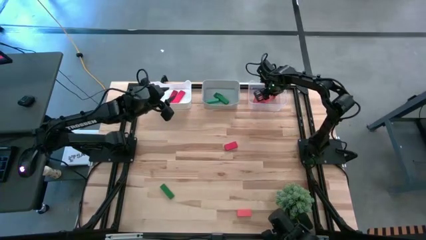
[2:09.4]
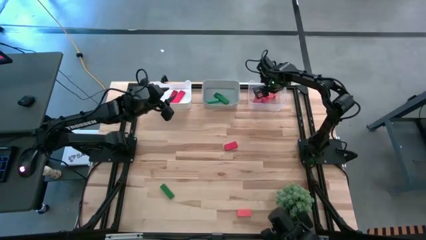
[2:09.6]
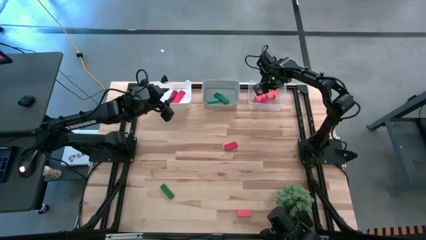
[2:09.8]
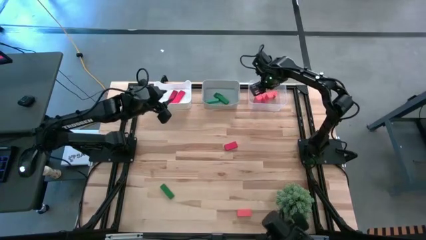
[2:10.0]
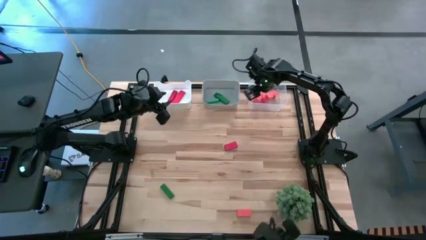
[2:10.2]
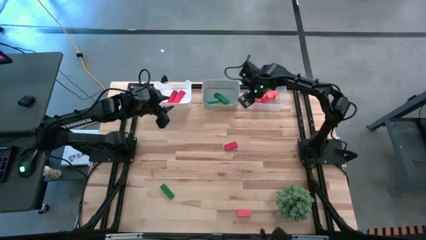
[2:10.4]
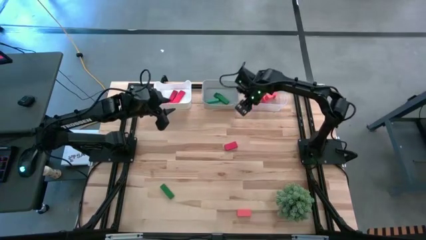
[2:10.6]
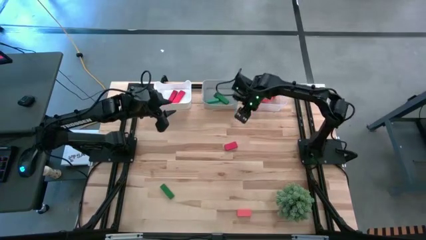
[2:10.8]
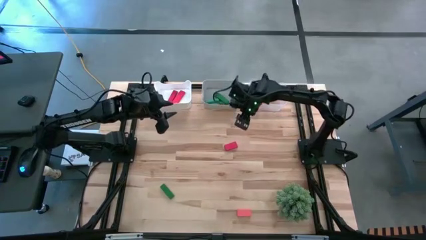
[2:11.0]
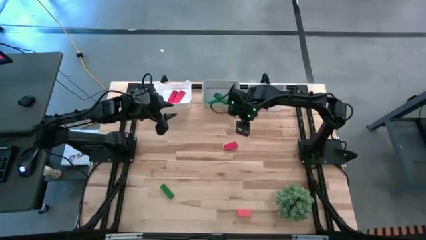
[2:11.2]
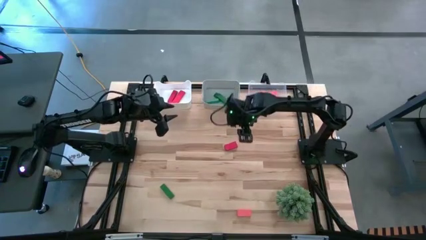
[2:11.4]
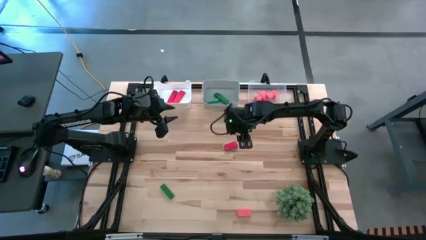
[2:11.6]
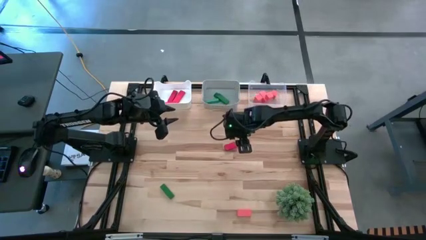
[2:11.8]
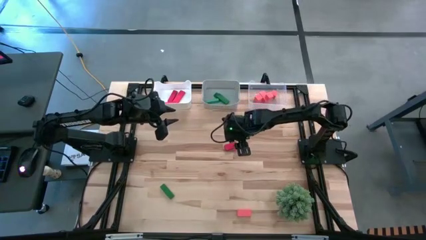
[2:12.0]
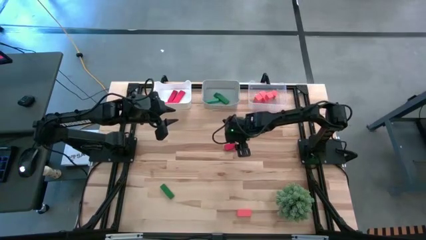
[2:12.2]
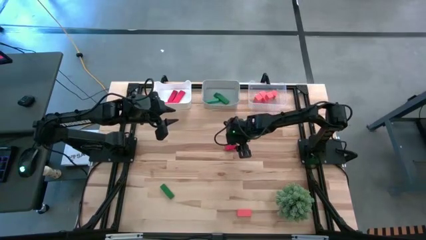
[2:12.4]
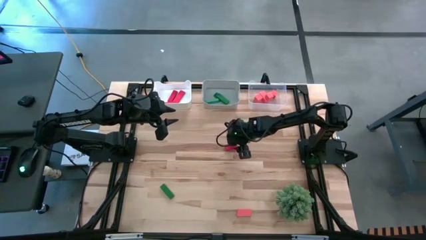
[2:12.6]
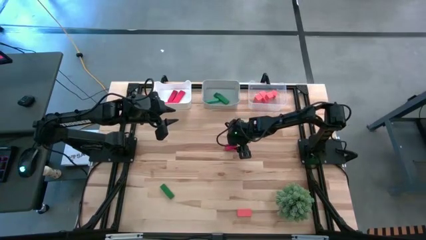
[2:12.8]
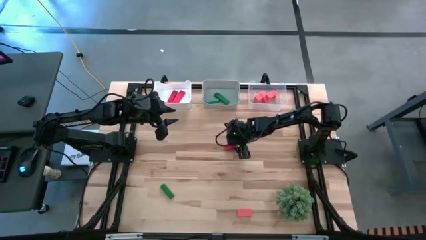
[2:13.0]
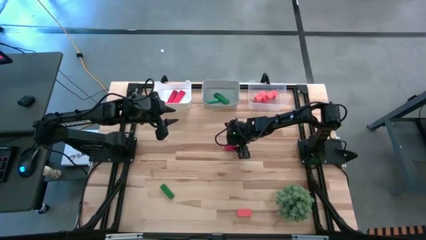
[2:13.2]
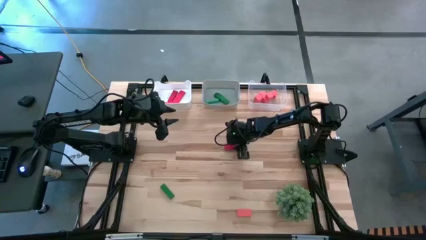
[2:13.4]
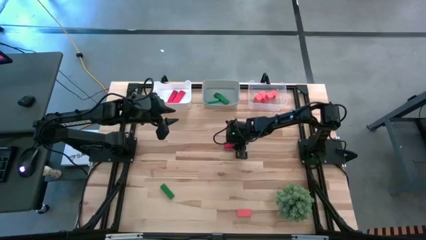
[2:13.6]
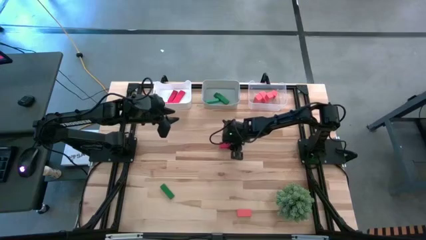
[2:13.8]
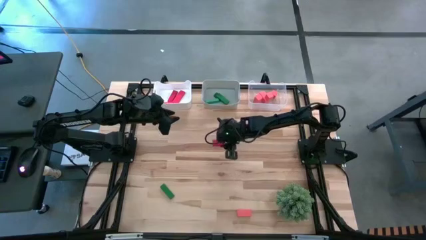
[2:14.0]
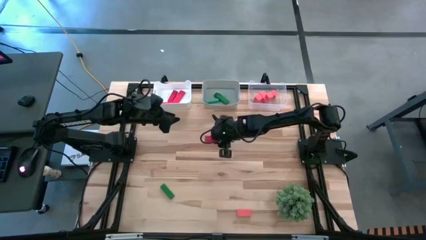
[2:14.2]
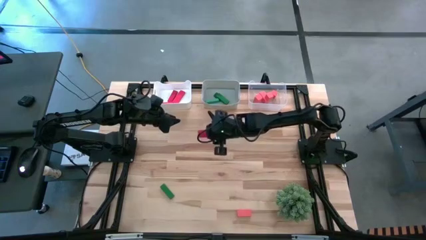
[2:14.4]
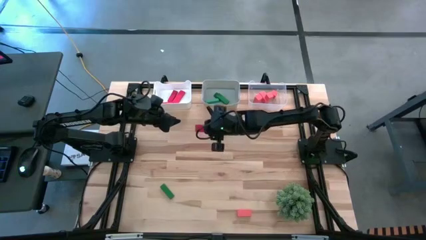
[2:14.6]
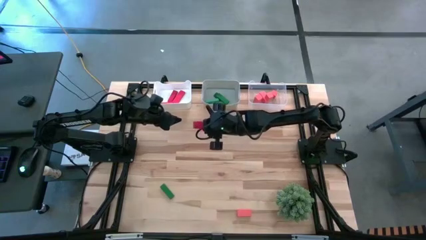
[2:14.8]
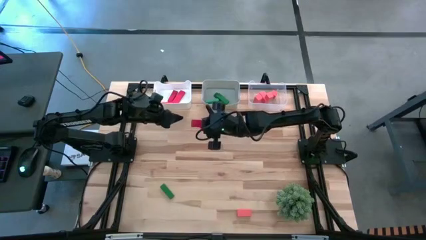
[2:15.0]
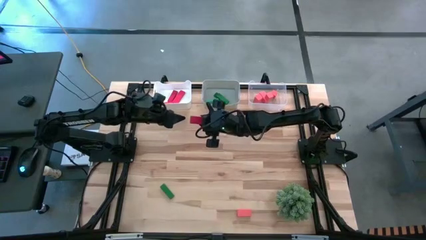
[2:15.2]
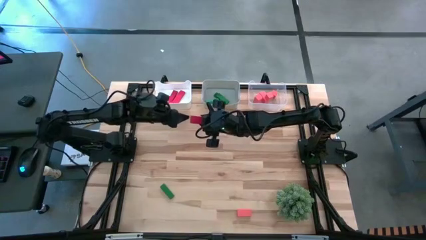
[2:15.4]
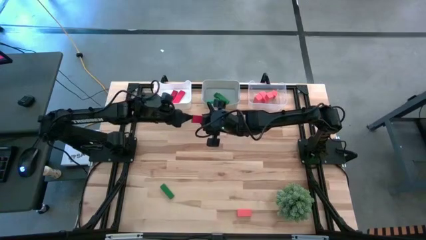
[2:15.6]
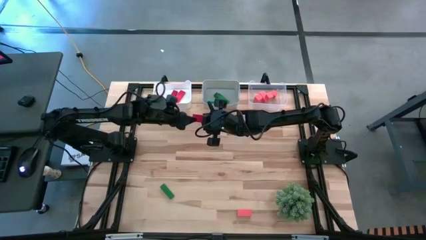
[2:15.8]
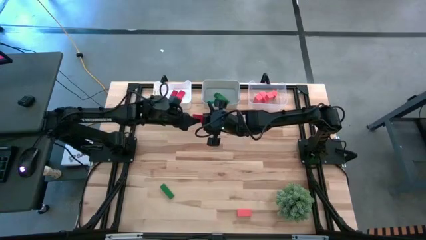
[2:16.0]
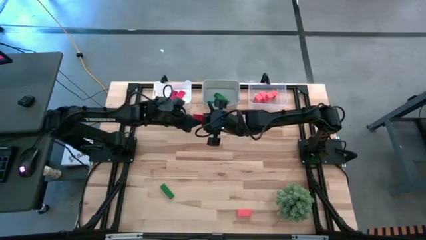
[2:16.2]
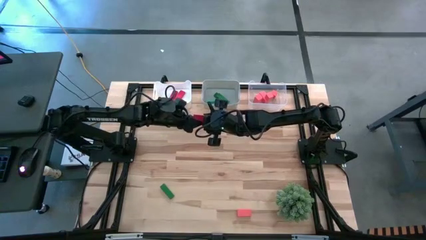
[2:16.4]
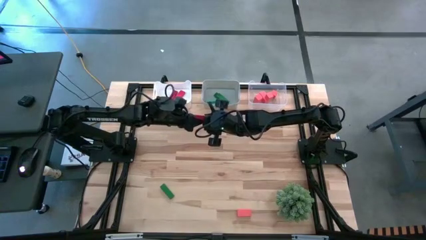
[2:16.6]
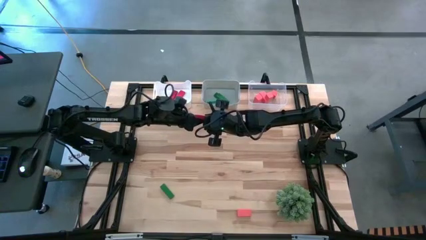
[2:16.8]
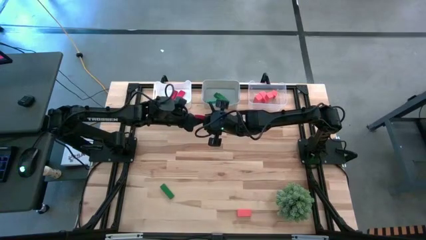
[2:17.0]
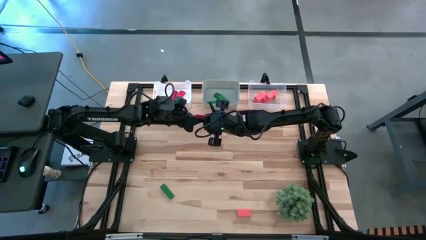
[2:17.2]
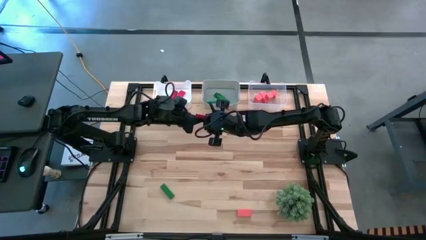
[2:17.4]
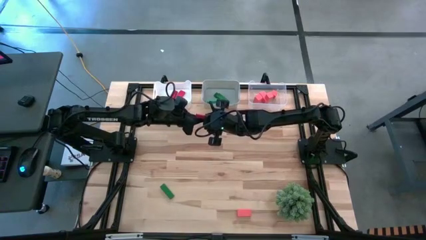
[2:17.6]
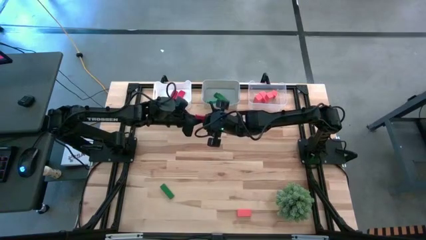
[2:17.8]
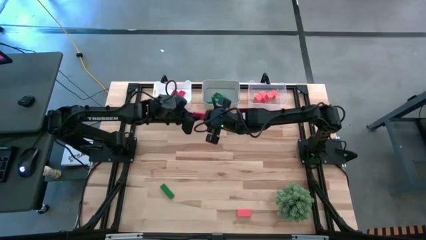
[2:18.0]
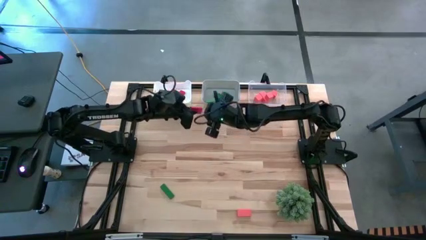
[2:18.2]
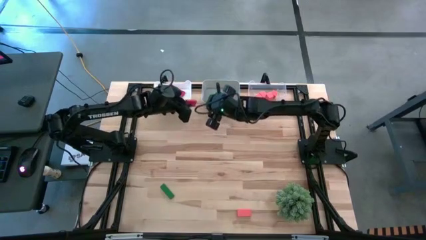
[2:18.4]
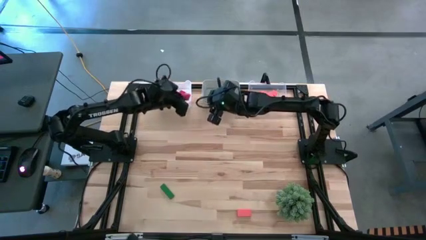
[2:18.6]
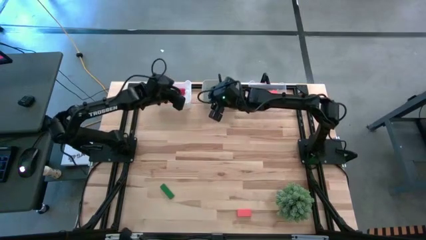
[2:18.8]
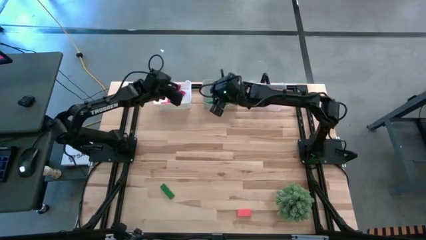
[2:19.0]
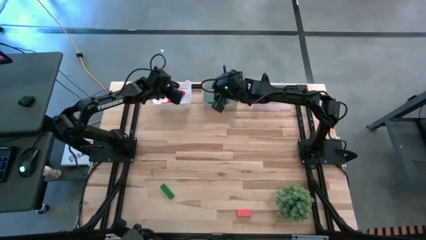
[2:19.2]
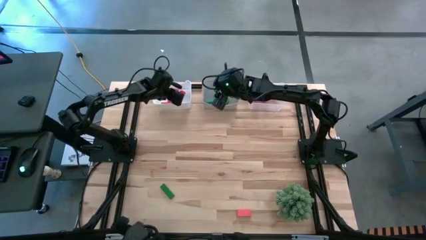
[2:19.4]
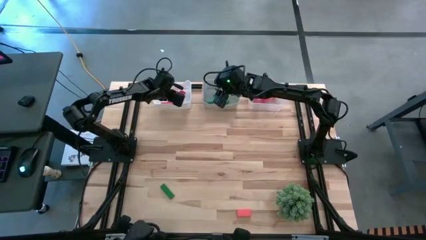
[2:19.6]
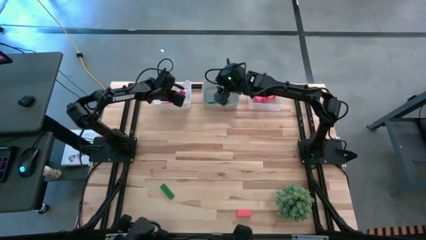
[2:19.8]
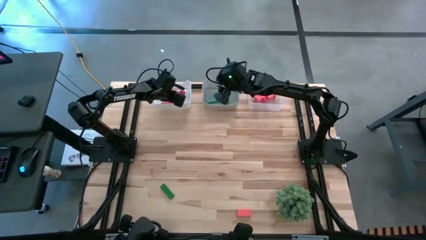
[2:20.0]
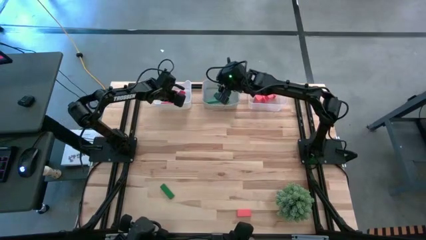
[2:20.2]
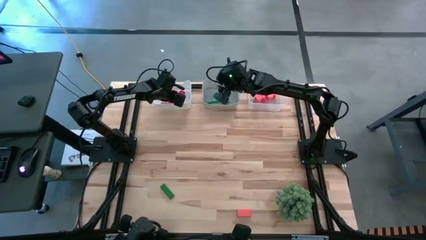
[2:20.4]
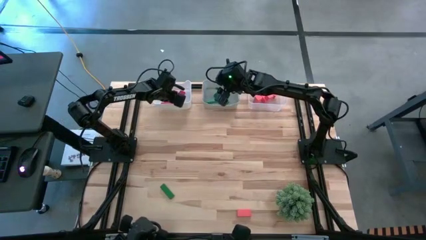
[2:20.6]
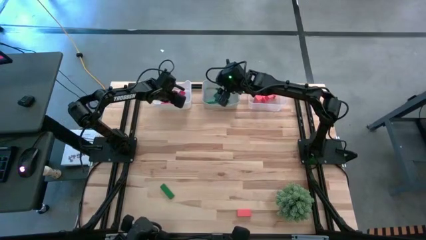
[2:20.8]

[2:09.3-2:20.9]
Task: Sort & place blocks by color
Put the red block into the white bin

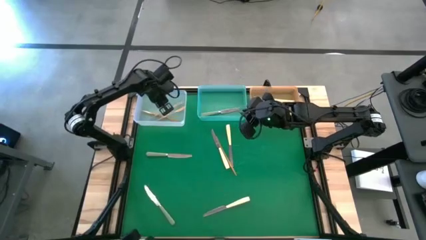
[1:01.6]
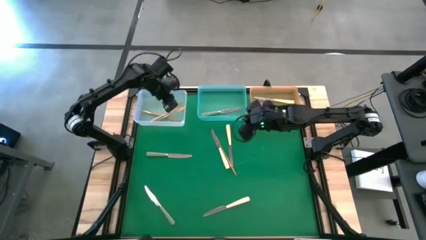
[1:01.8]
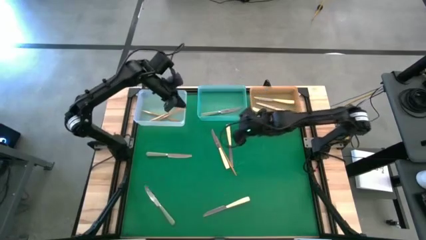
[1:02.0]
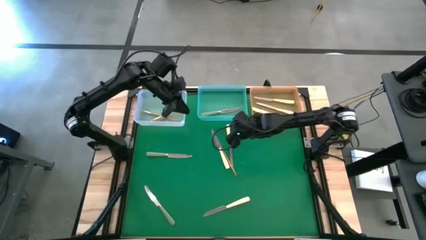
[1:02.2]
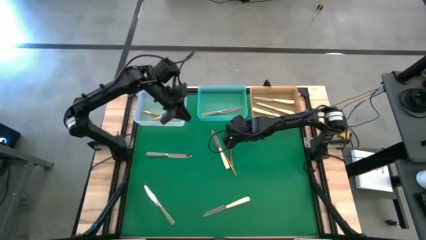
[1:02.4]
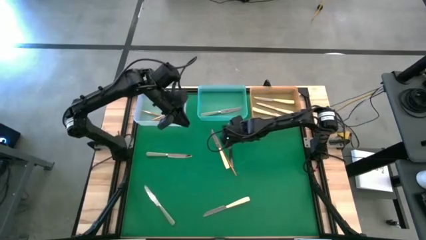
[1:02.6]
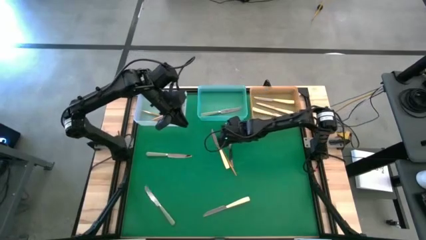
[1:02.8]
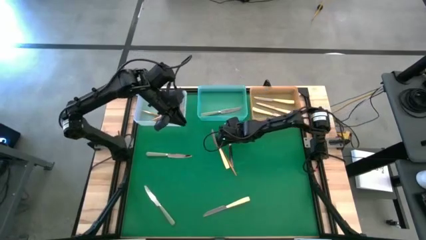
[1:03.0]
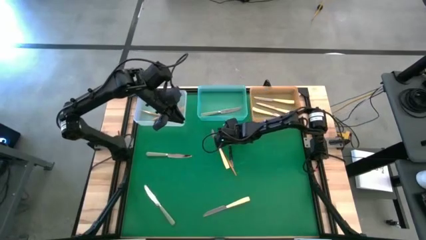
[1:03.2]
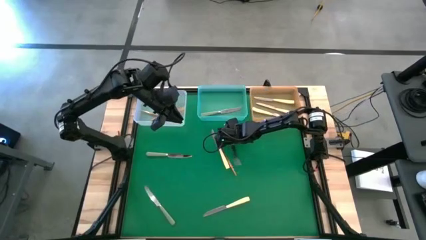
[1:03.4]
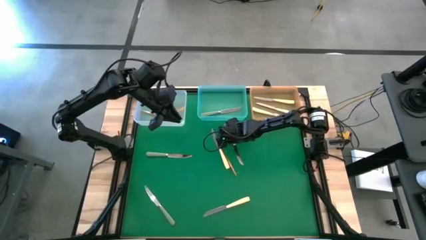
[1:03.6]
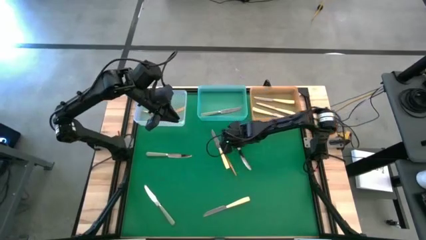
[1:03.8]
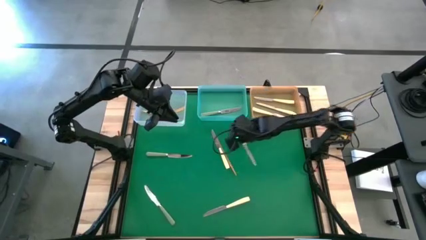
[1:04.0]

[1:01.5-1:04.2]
Task: Sort silverware by color (type)
Put the yellow table knife into the orange bin

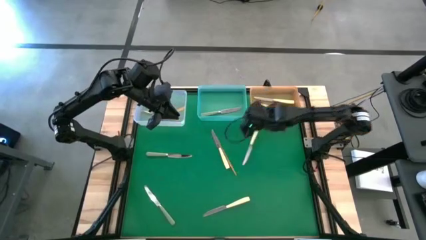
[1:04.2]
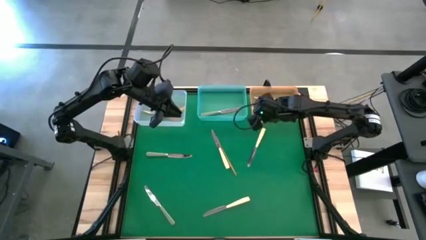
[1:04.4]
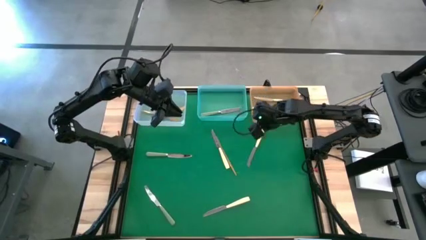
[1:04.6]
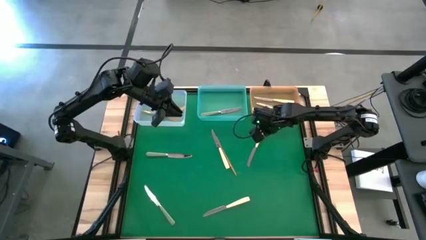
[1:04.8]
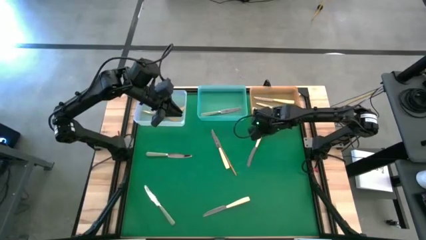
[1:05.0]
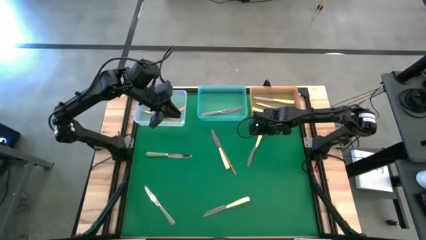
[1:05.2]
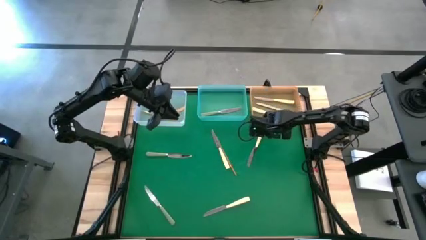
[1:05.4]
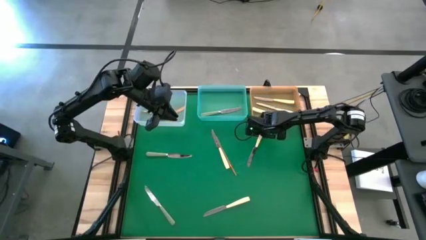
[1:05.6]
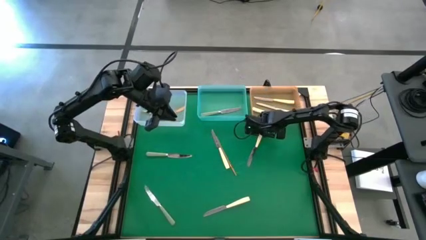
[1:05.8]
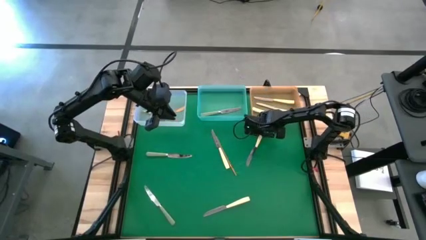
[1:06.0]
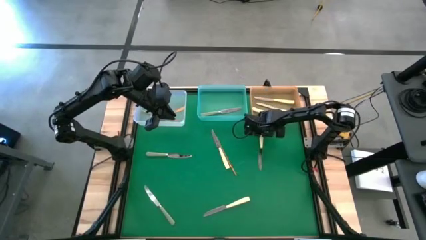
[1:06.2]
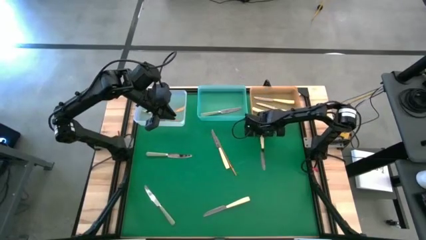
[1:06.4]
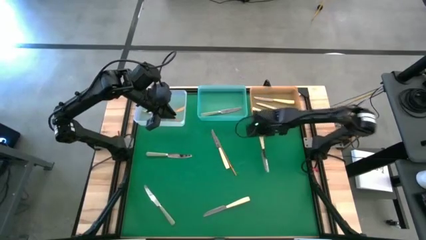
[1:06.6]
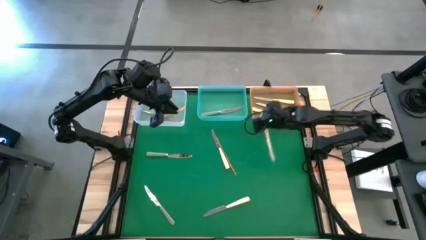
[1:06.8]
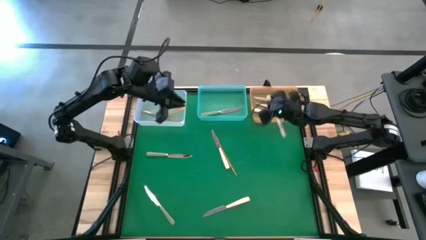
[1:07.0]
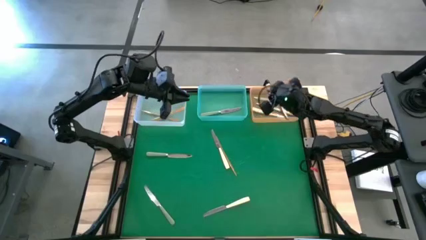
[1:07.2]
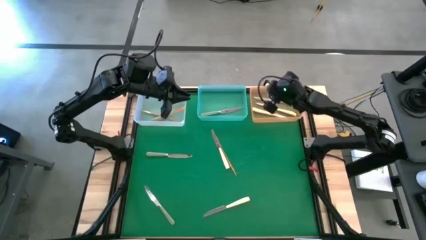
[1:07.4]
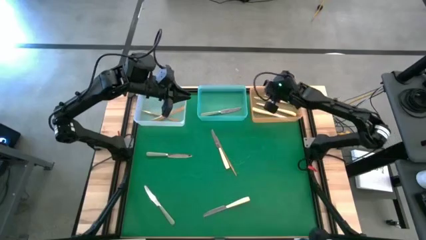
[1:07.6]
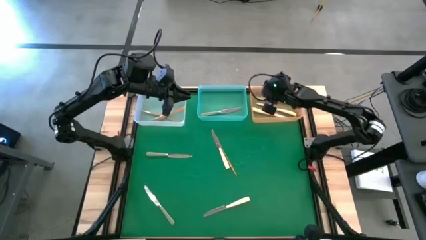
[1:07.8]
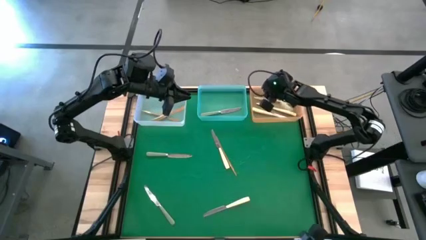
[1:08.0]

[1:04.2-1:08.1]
Put the yellow table knife into the orange bin
